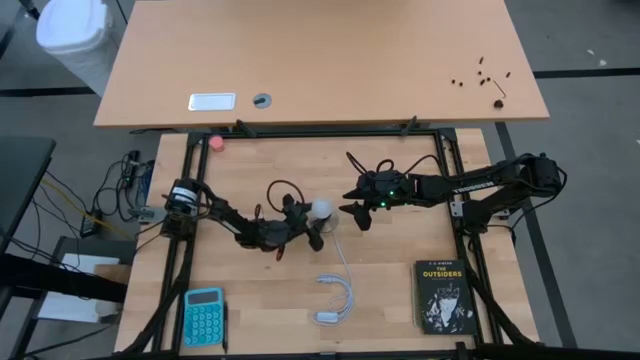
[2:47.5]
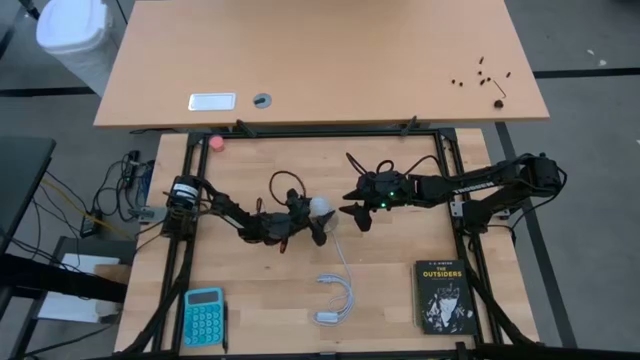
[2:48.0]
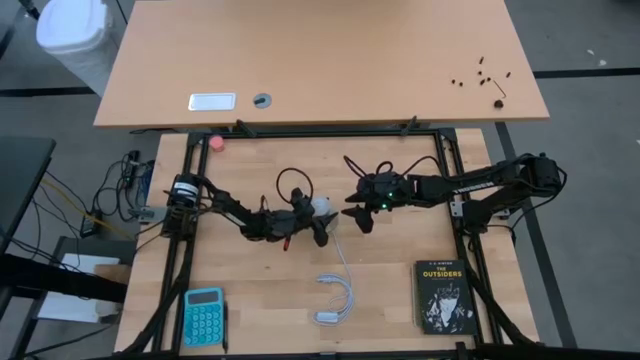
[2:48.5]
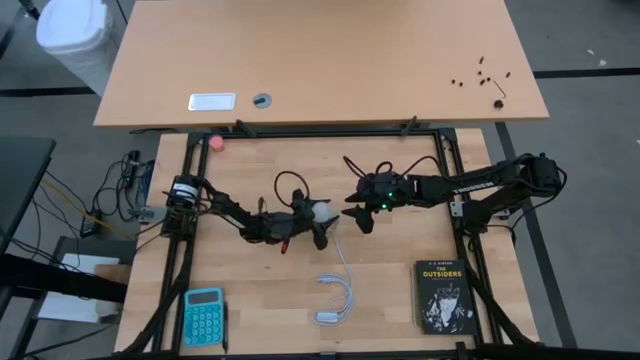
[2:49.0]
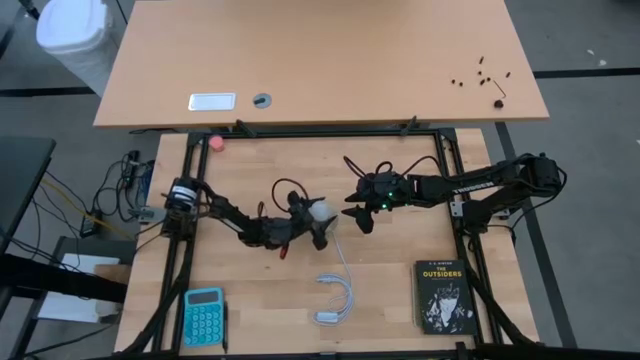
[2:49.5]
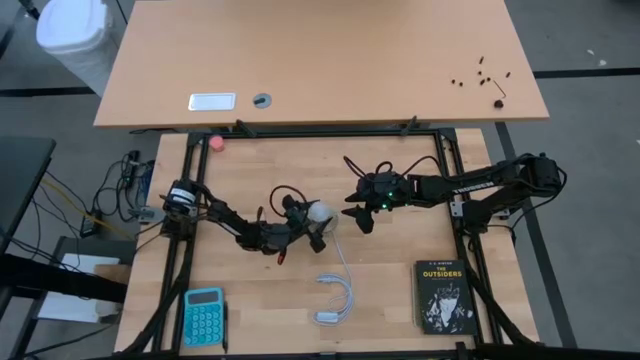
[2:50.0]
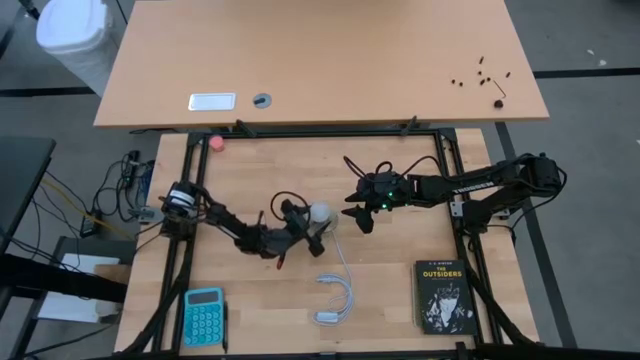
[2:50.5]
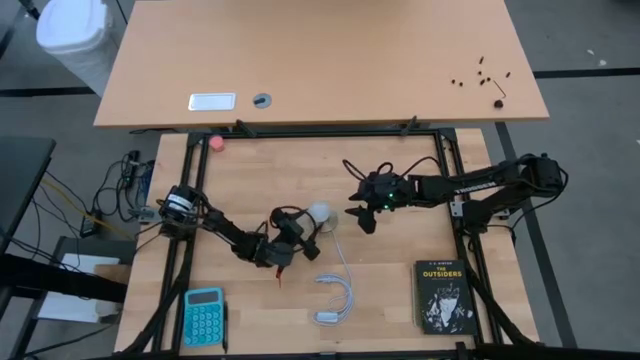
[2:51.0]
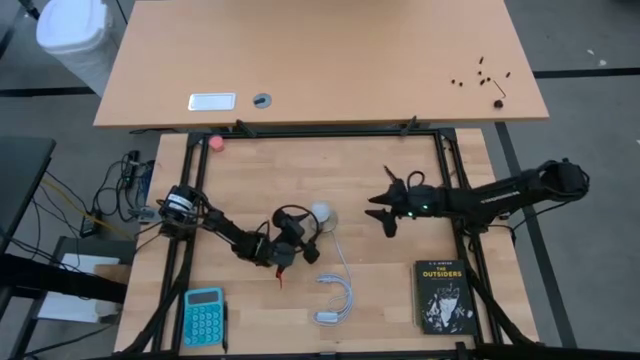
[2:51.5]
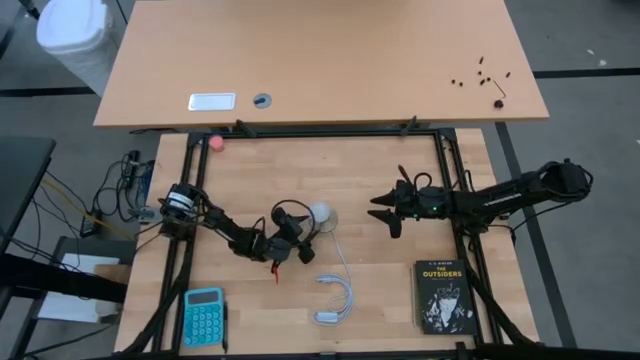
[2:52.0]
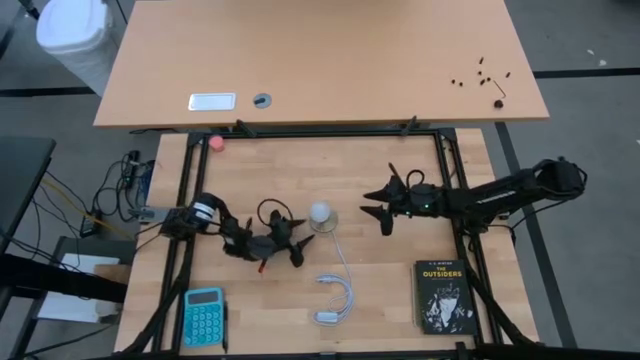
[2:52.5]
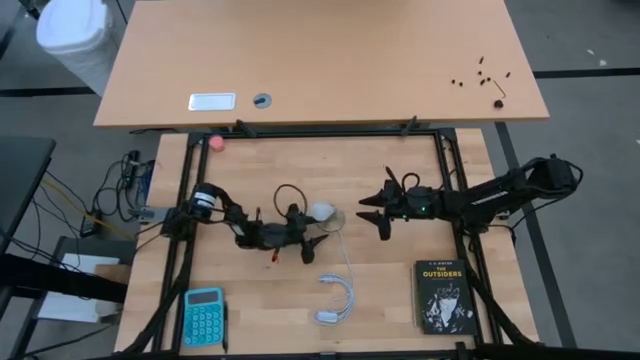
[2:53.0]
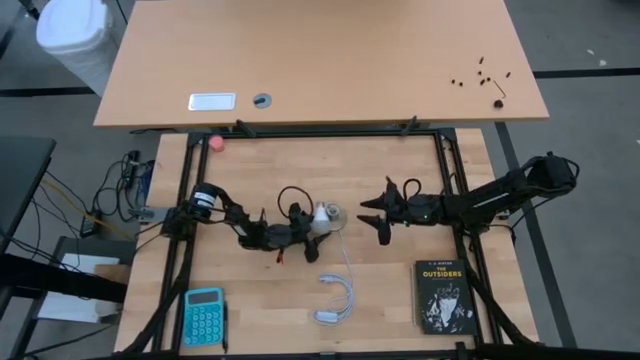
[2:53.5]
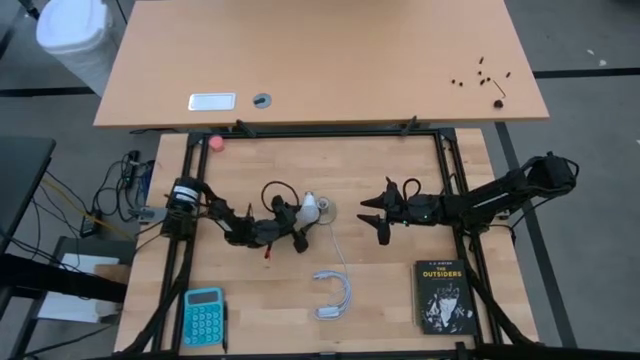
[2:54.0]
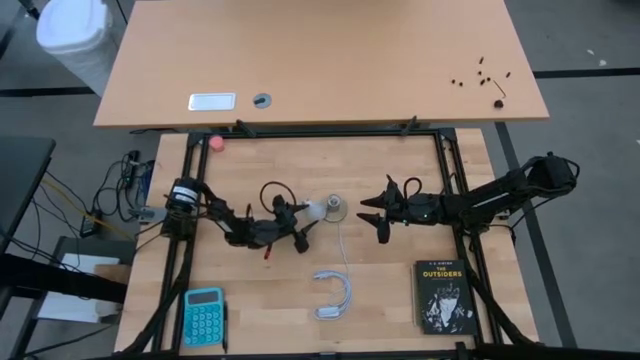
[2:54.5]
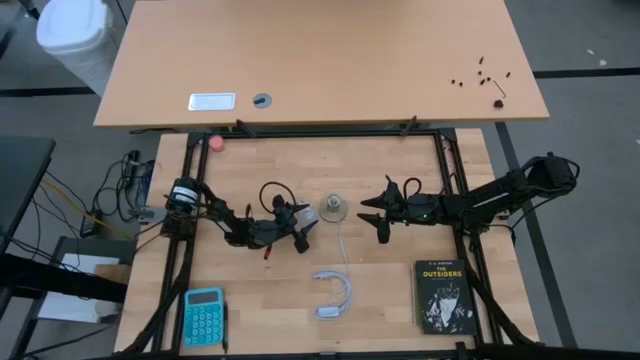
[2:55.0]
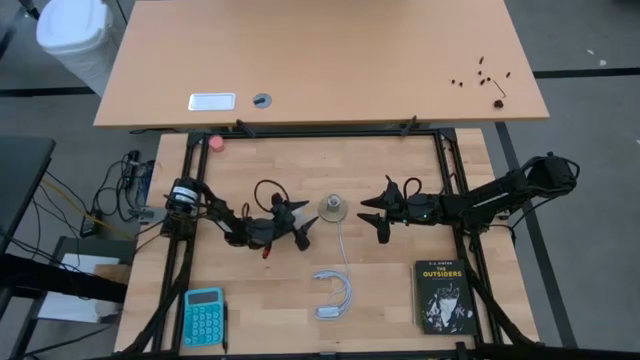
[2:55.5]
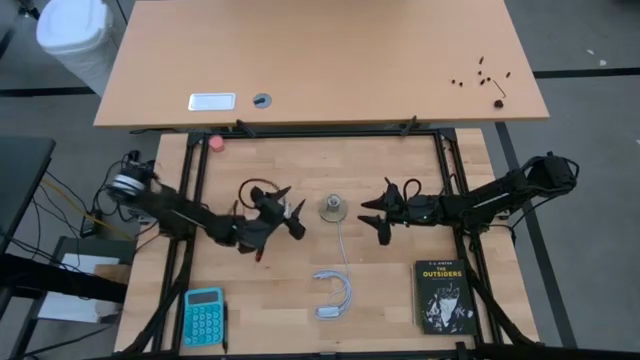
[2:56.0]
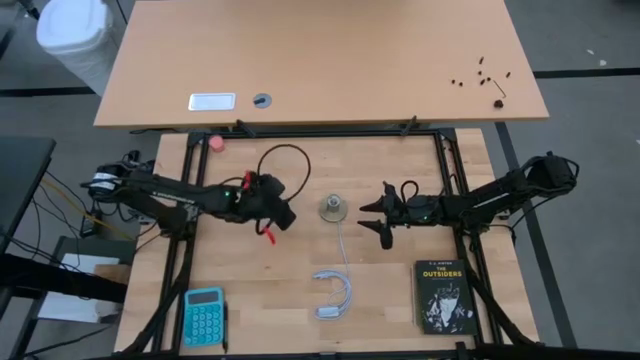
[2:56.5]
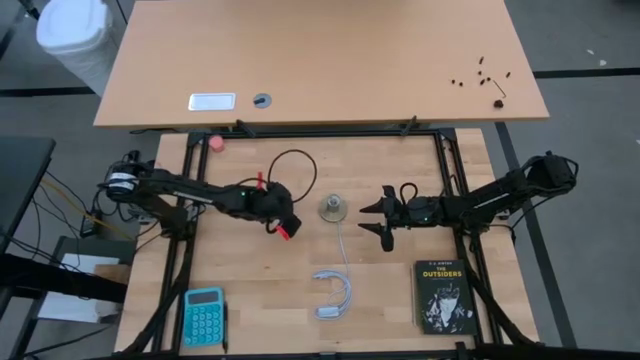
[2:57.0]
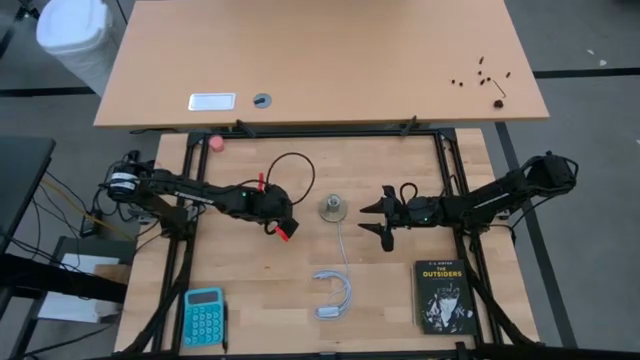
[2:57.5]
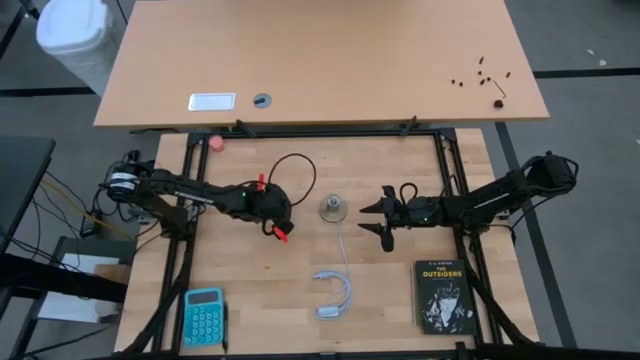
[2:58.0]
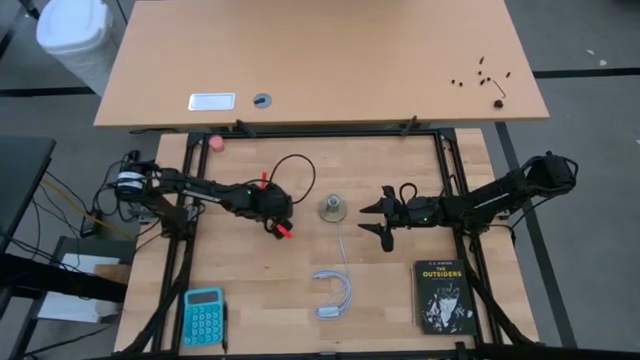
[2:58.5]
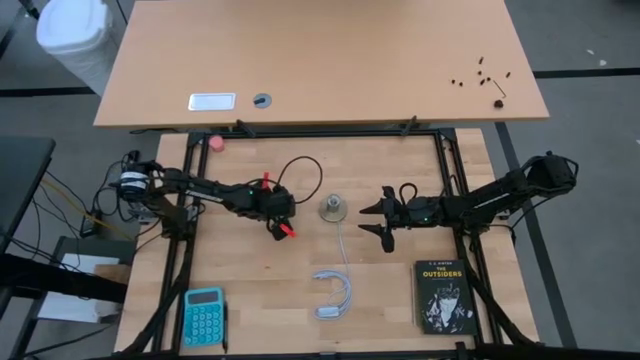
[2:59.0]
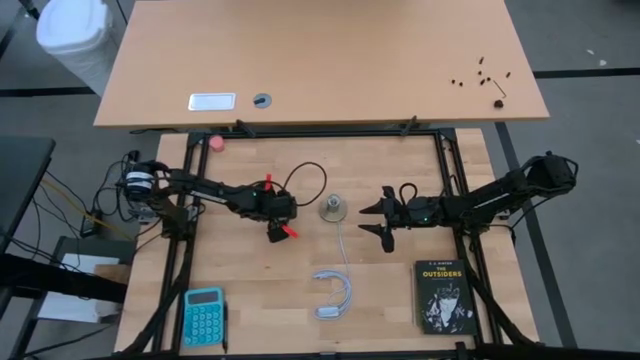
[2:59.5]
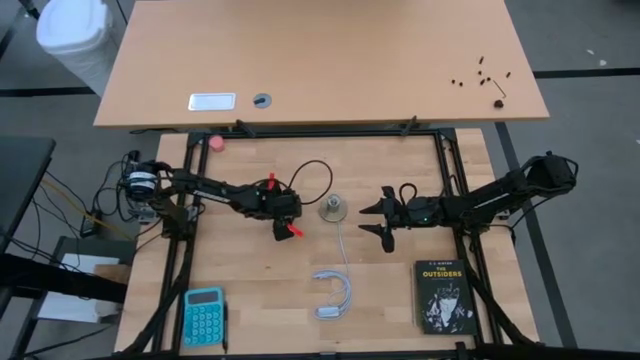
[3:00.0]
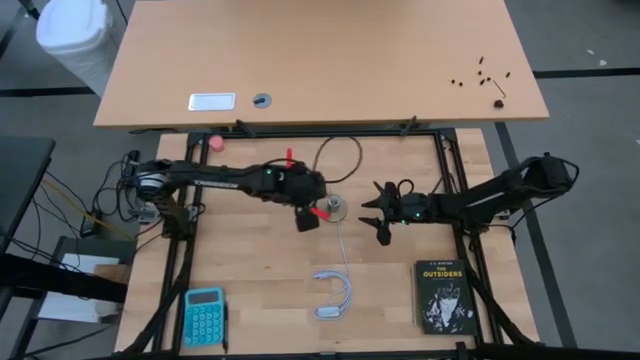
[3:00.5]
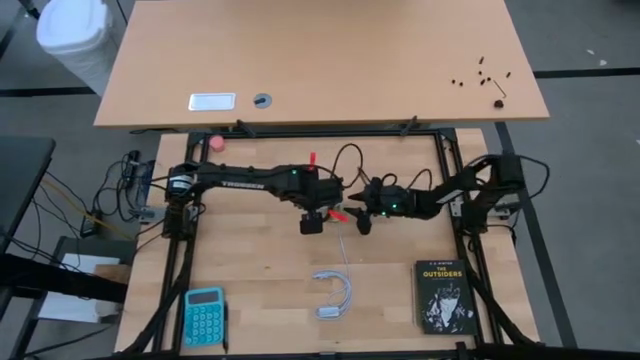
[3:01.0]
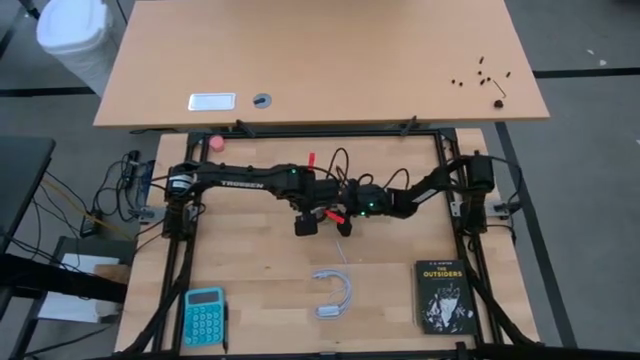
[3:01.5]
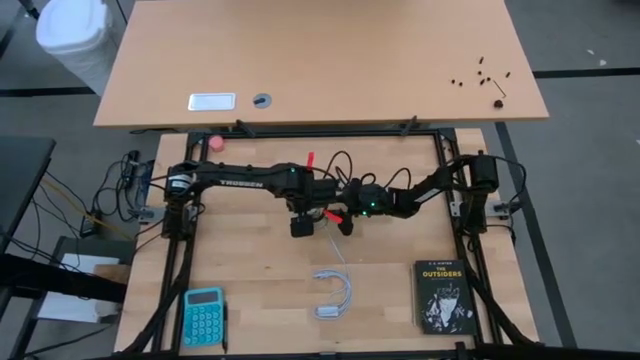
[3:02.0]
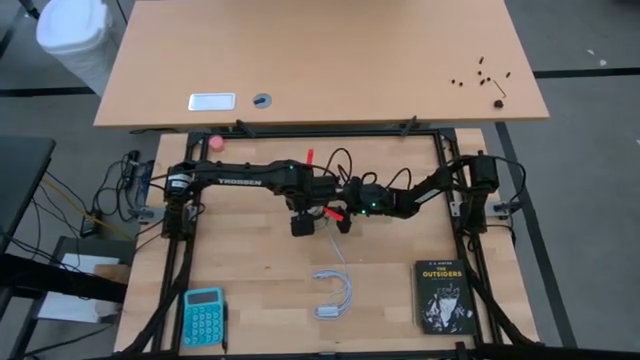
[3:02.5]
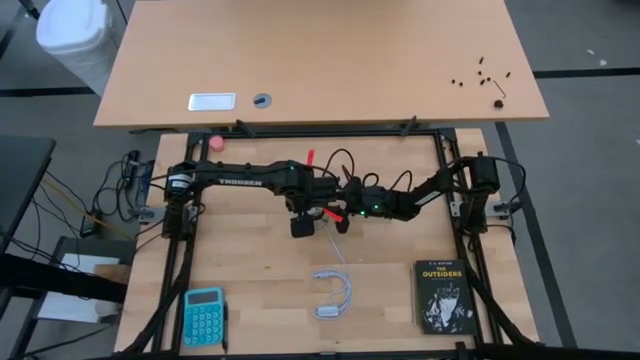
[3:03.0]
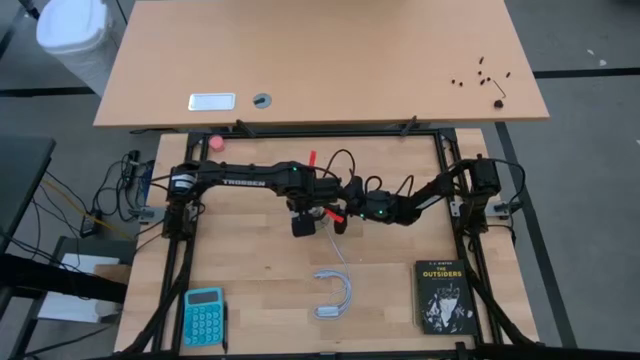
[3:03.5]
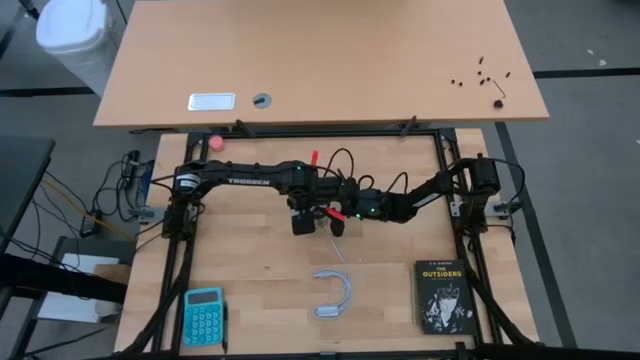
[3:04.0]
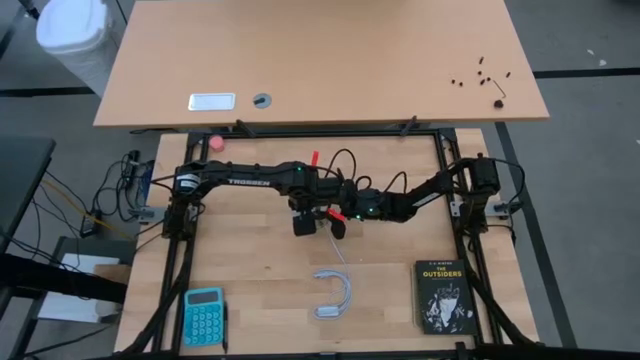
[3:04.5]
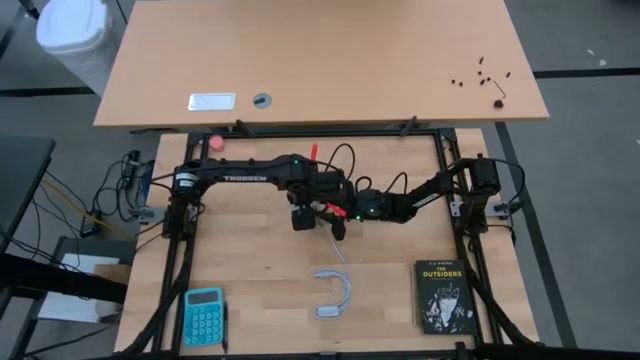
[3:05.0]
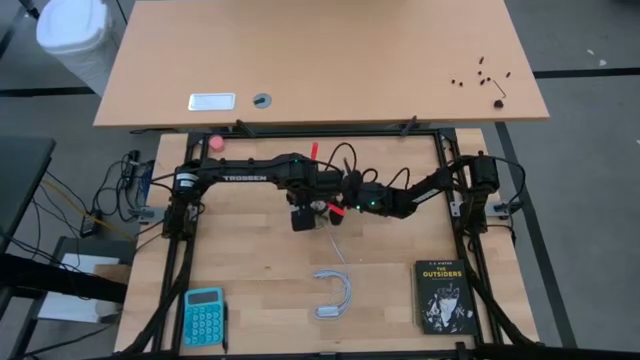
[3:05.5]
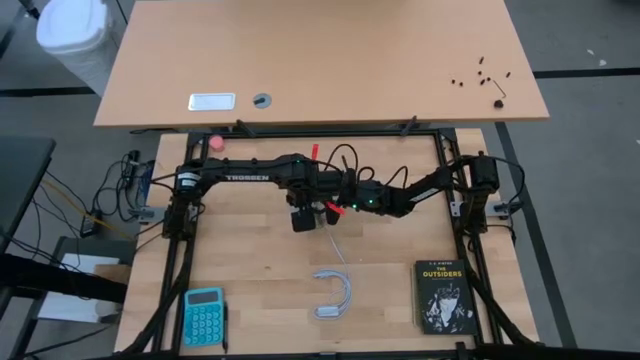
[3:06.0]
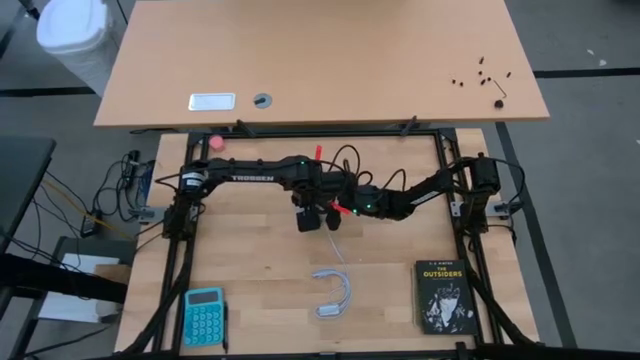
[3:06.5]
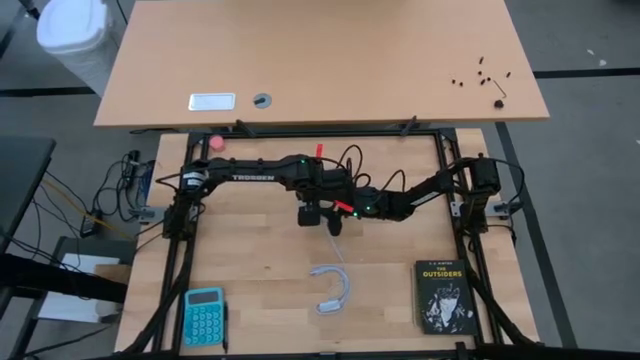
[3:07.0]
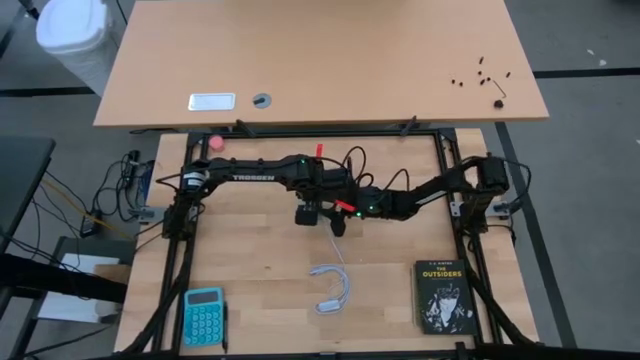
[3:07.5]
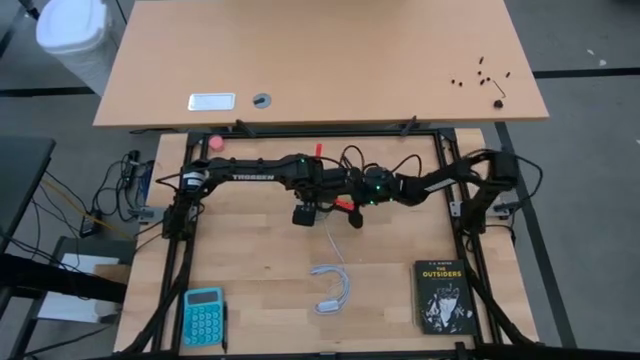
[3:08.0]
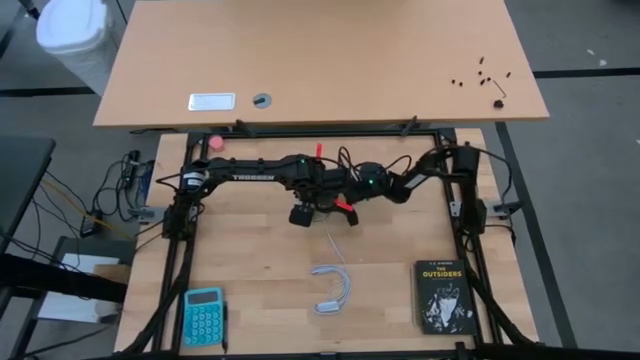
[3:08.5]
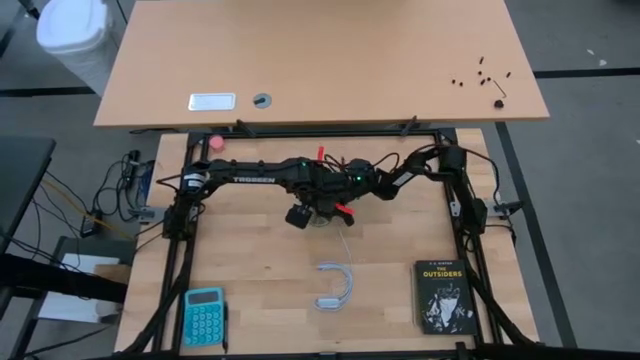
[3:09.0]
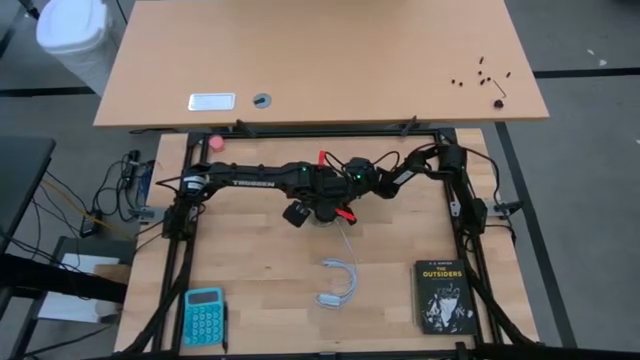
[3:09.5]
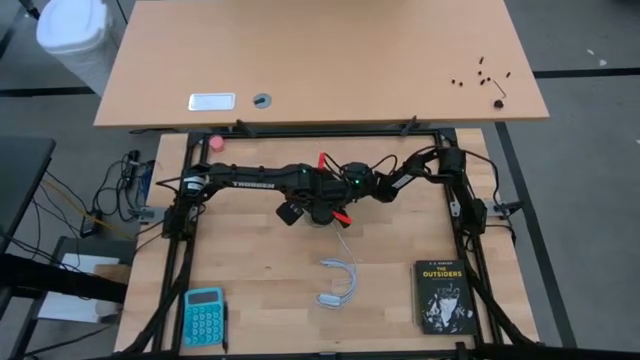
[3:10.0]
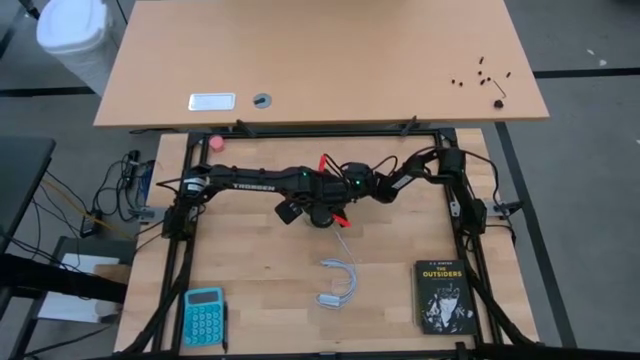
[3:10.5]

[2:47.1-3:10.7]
Task: Screw lightbulb
Insert the white lightbulb into the silver lamp
